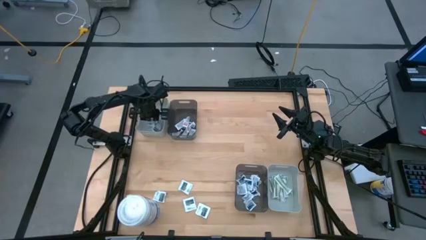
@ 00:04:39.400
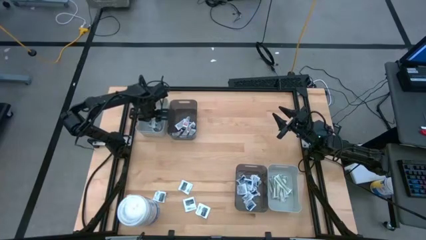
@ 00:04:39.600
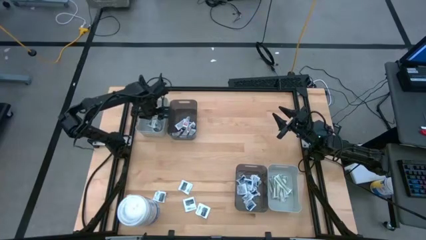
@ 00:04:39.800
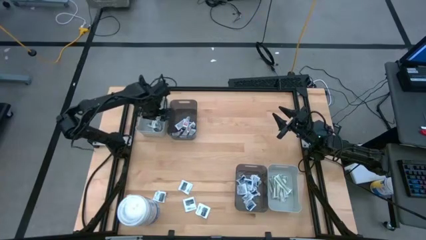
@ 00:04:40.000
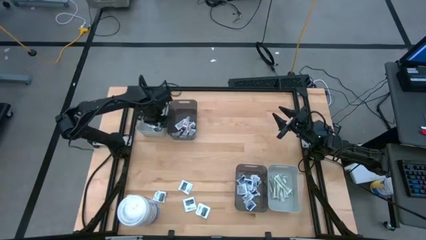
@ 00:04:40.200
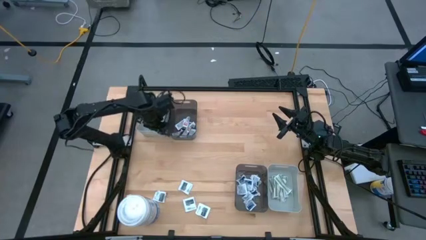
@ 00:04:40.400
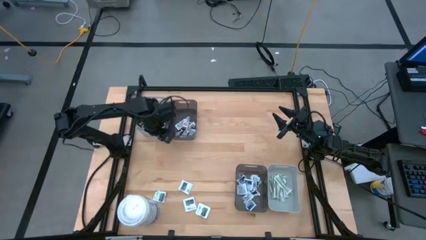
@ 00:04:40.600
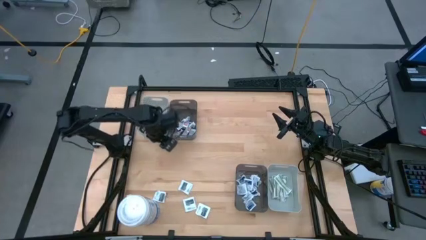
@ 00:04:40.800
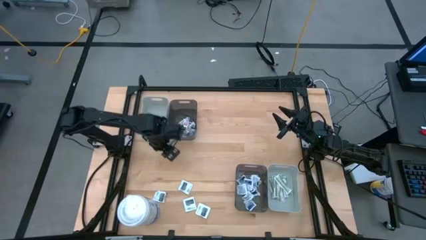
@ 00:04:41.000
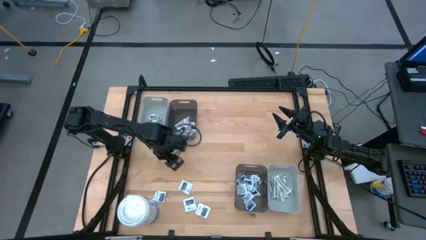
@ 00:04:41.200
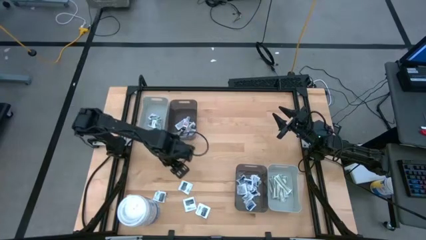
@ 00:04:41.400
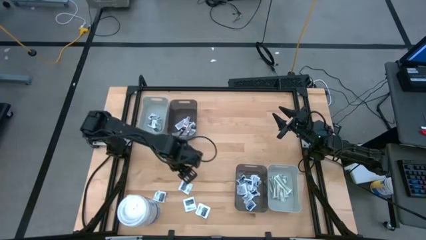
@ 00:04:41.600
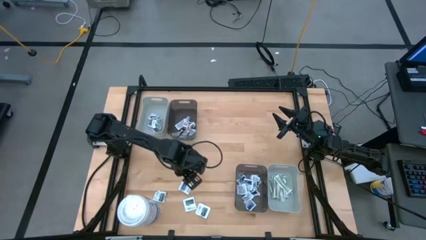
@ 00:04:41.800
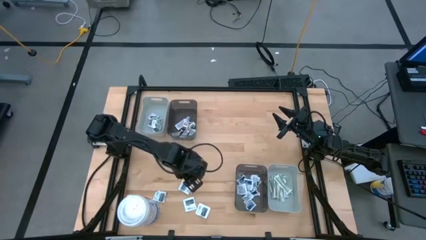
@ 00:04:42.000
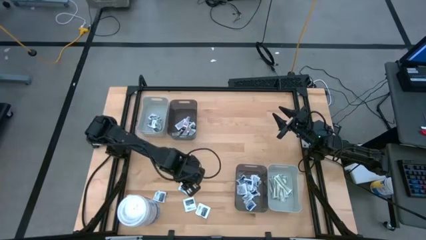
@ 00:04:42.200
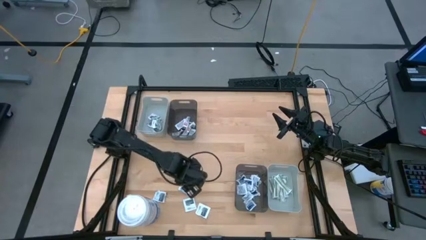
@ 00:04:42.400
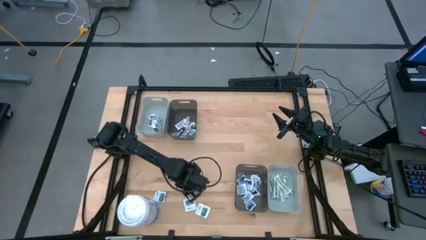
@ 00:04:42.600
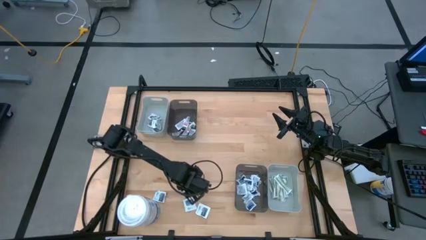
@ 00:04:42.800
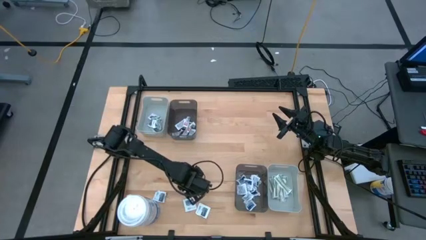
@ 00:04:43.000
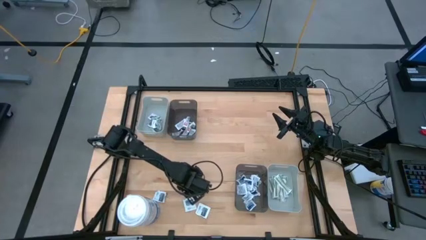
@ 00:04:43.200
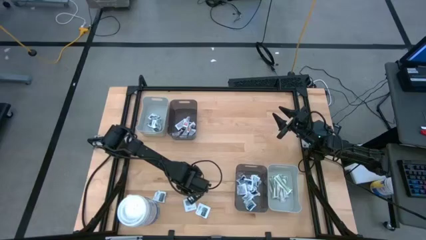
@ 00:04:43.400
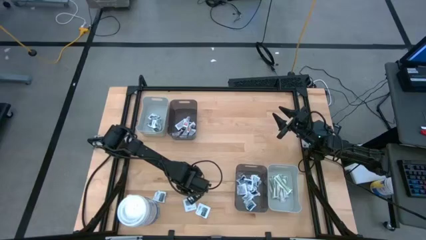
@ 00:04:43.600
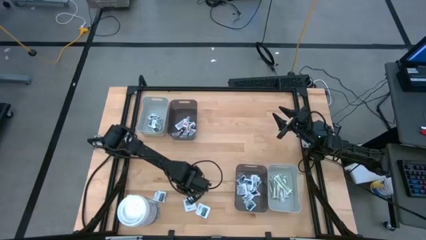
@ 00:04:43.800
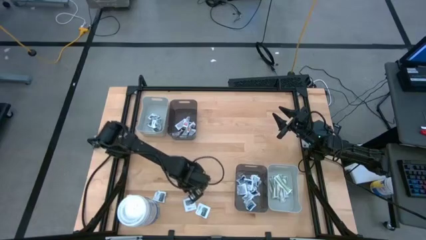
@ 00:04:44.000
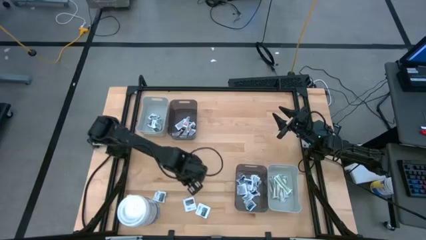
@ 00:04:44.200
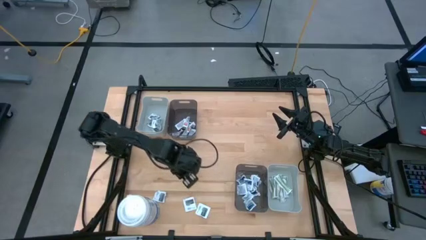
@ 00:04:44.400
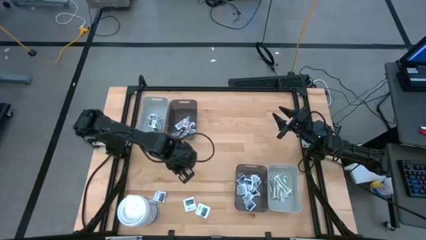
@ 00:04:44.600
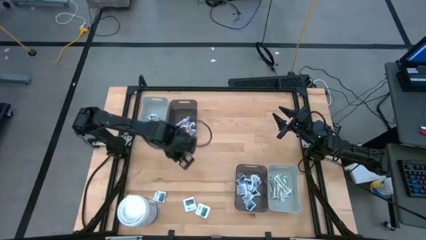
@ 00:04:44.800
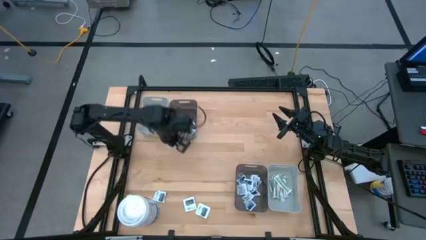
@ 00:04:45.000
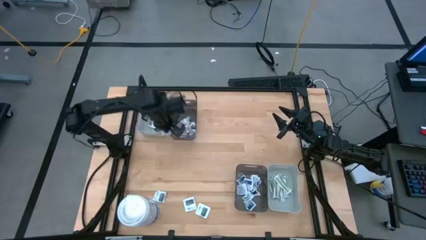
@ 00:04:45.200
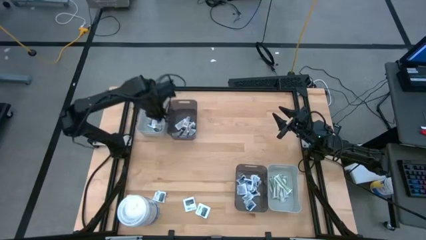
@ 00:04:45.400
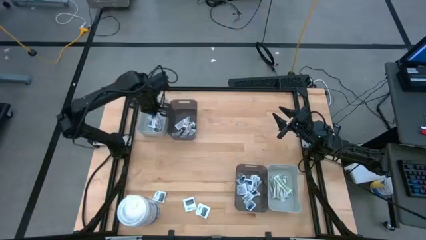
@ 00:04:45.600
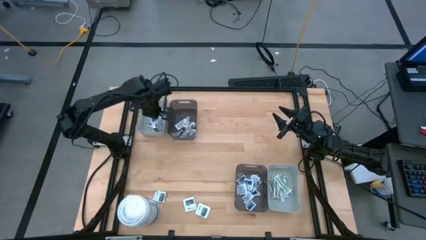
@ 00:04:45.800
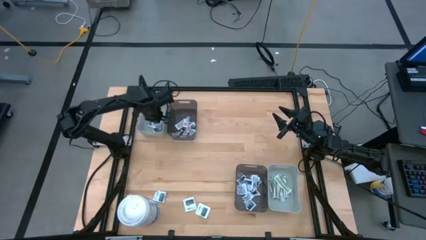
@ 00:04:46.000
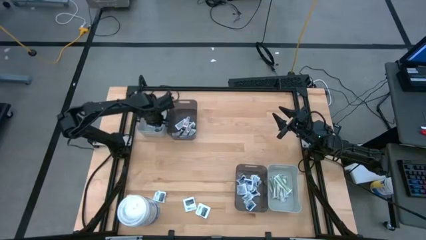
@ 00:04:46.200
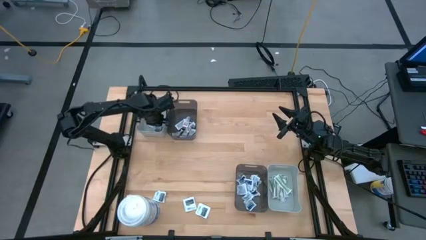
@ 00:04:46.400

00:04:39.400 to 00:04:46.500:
Task: Pick & Place First Aid Supplies
Put the white towelette pack into the top gray bin

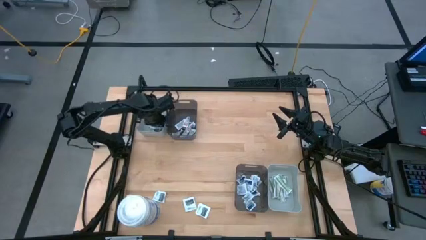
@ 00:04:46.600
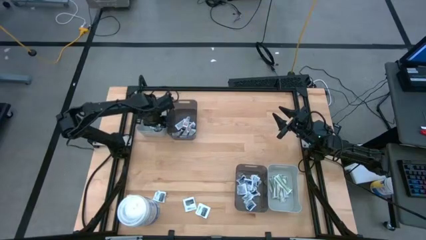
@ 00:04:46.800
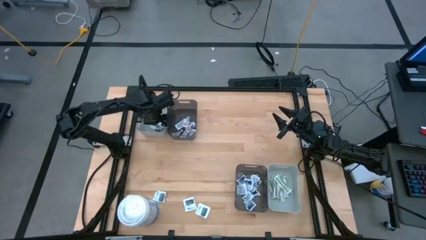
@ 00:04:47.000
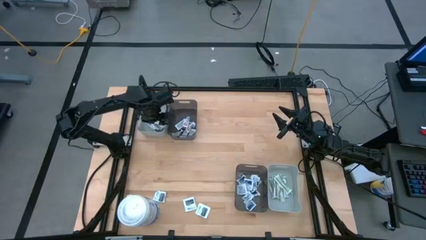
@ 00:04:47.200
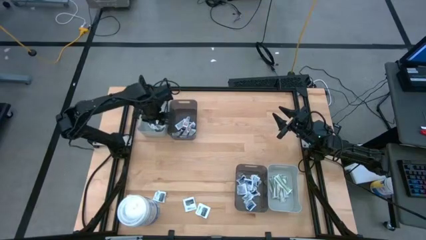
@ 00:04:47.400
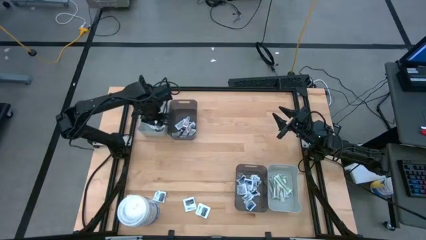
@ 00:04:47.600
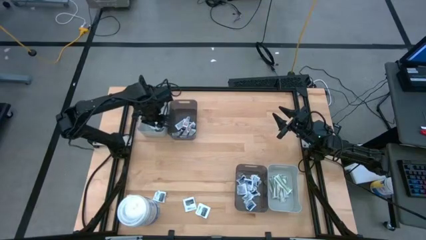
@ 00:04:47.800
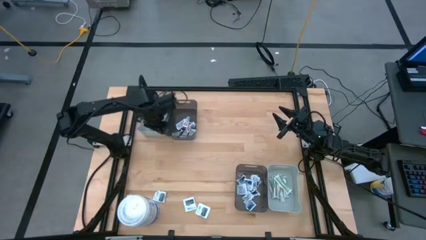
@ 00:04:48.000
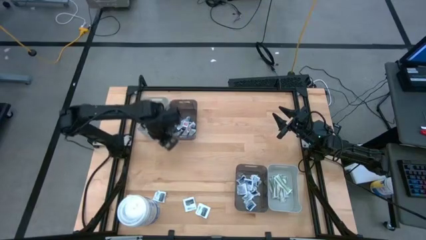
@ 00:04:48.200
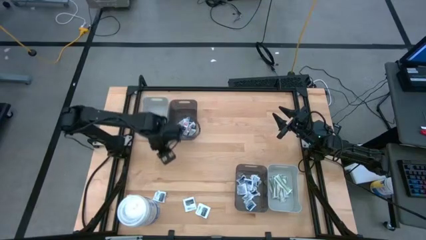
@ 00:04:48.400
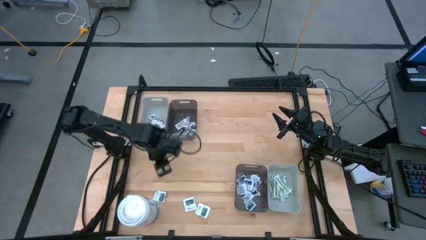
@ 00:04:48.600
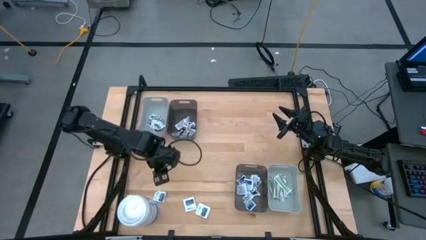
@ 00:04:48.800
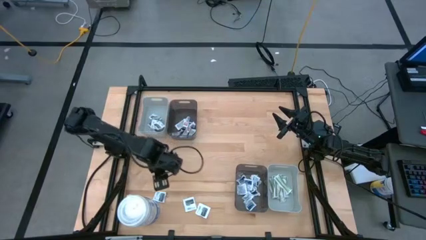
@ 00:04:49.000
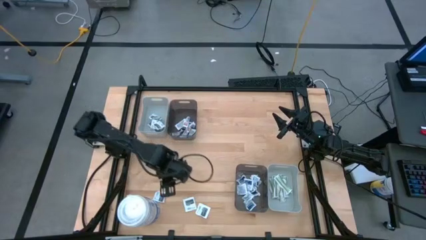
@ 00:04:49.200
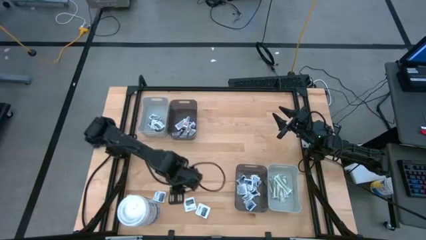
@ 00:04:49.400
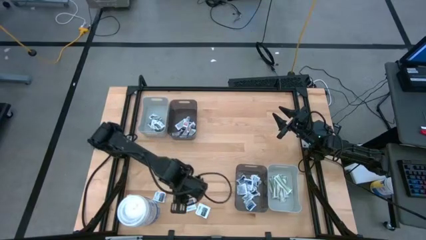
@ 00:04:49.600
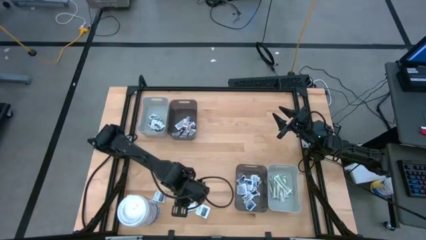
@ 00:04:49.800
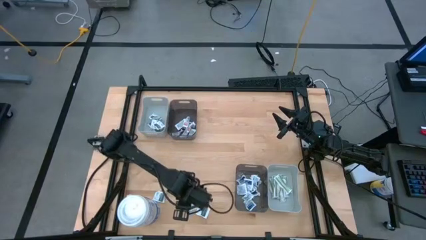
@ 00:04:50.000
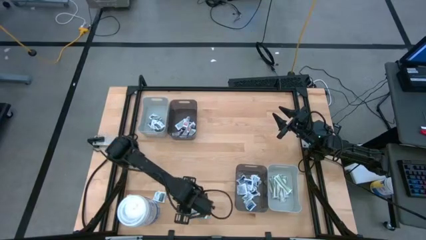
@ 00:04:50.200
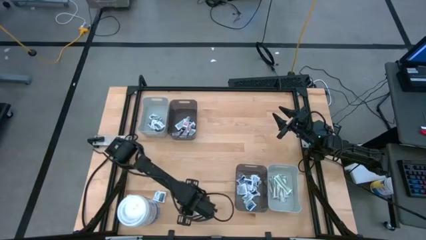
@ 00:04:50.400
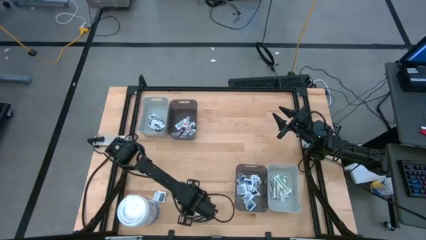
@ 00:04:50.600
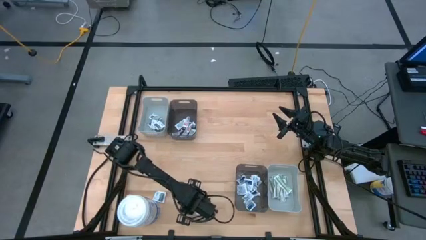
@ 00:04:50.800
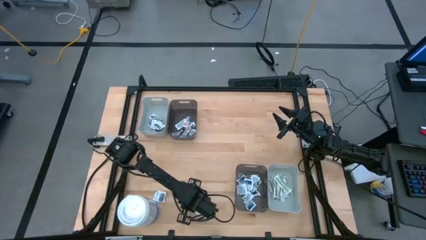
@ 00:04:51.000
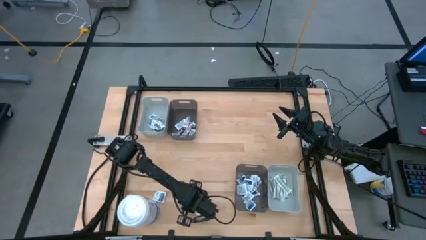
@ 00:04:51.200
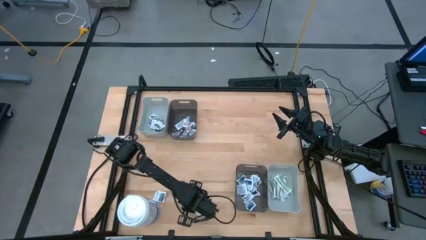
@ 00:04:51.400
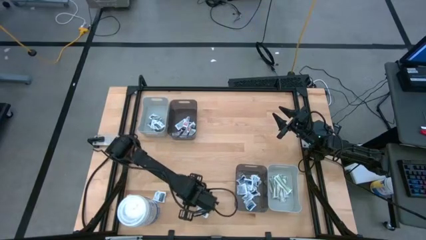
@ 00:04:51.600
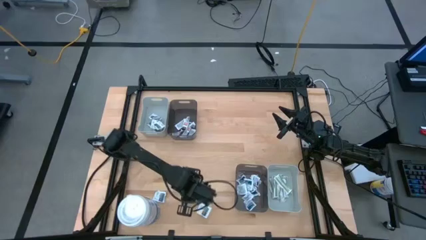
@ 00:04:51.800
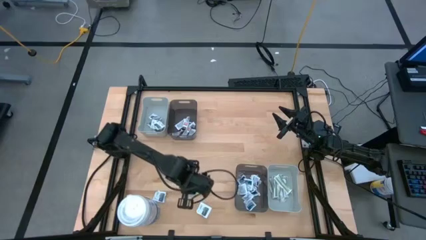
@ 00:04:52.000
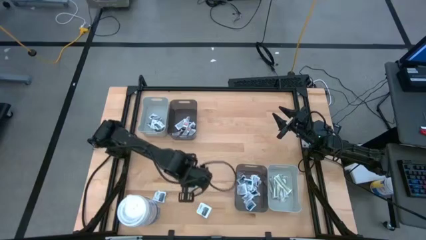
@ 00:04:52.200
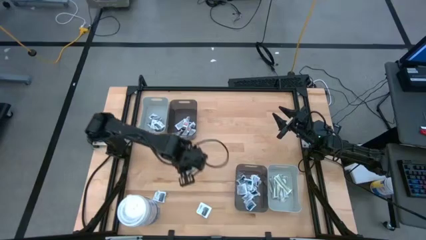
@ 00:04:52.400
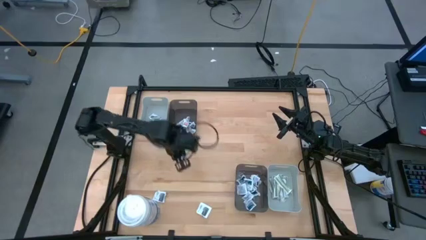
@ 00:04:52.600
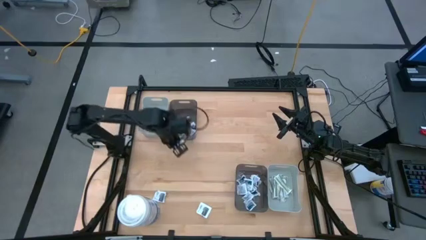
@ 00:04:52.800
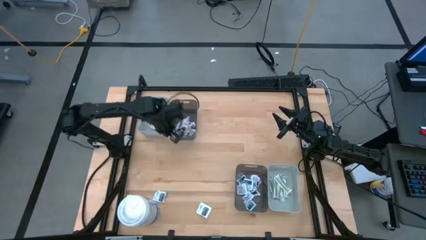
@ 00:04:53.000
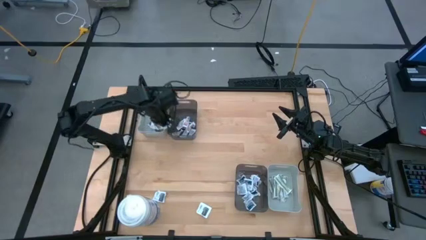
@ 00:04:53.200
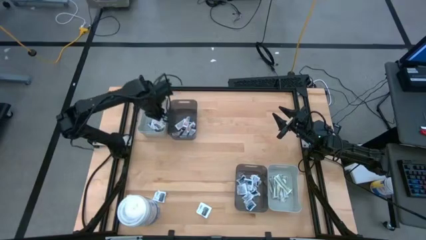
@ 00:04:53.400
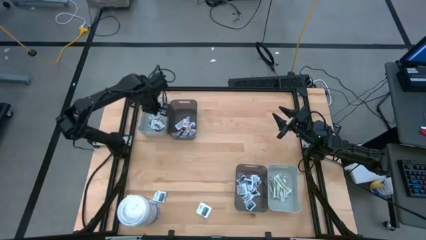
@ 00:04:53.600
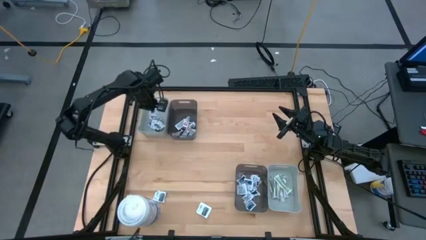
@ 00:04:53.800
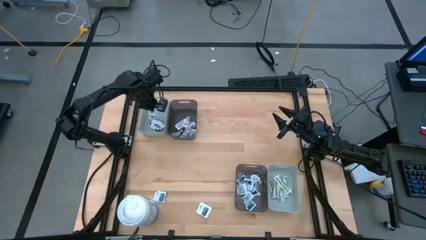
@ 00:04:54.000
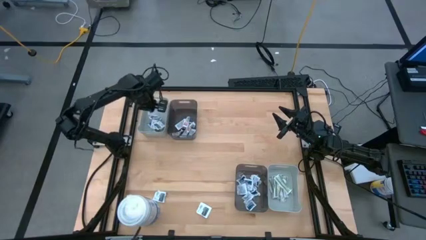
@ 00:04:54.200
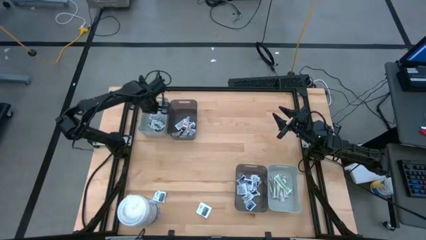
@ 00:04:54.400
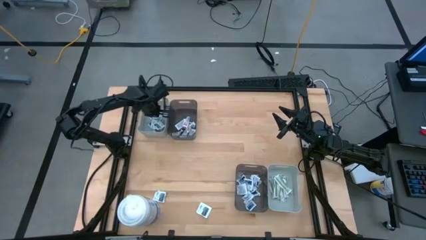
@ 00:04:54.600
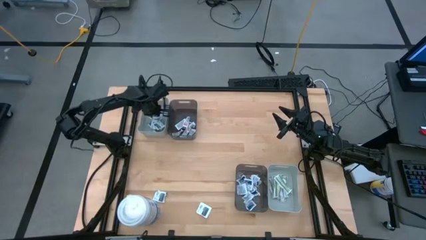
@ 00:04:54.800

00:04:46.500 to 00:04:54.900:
Put the white towelette pack into the top gray bin
